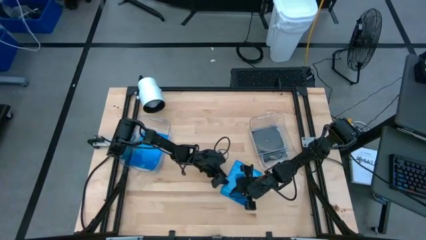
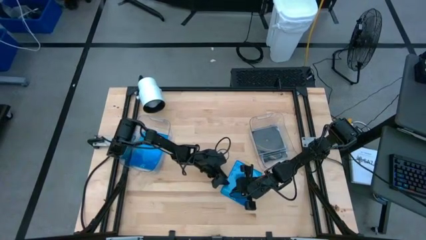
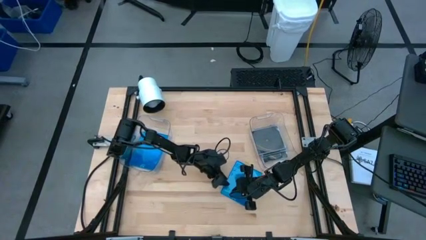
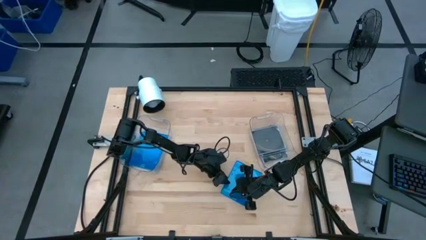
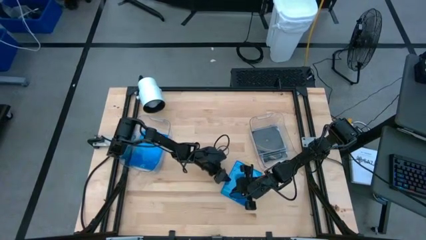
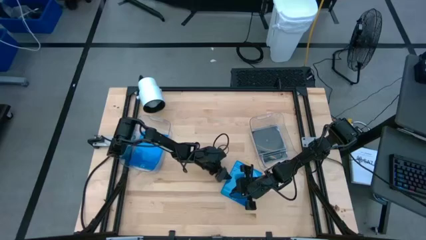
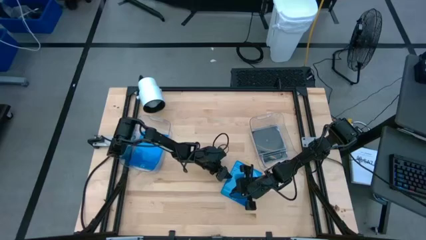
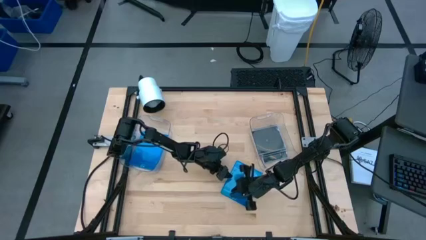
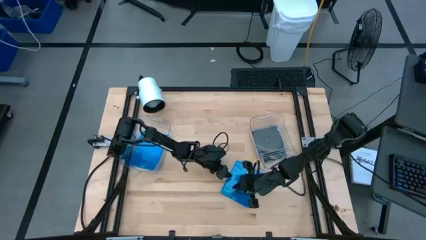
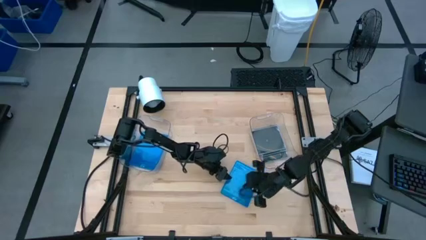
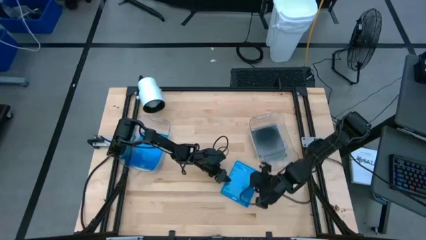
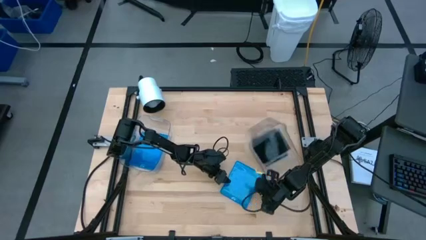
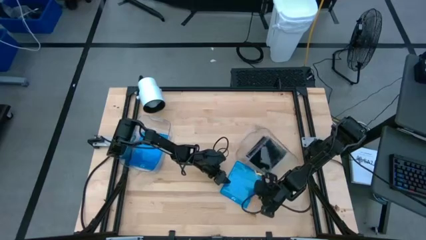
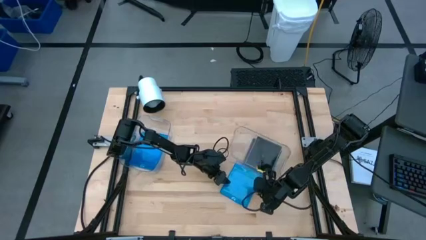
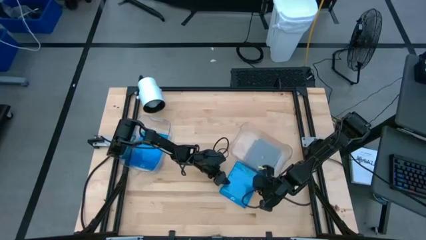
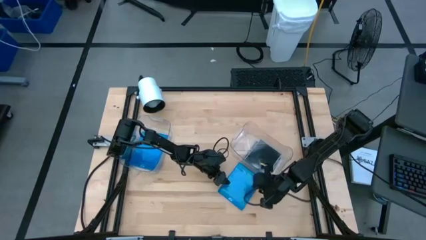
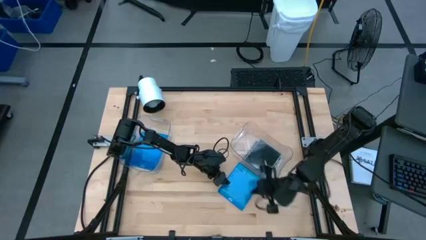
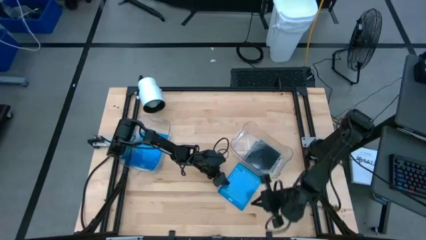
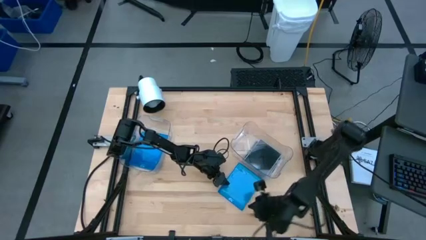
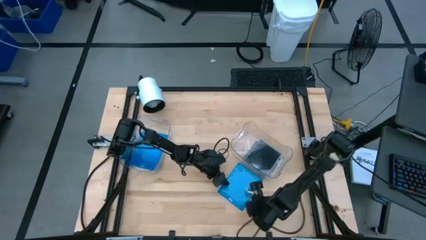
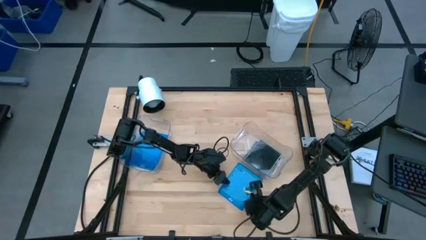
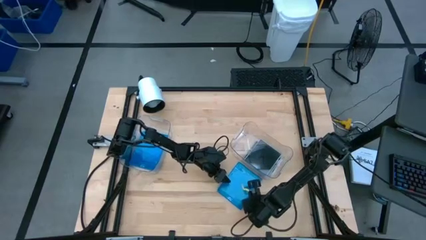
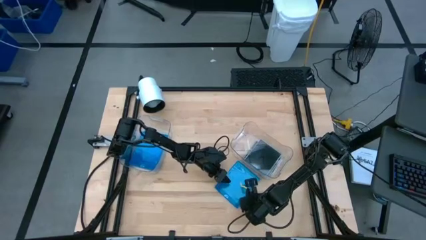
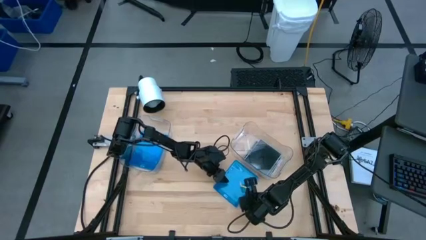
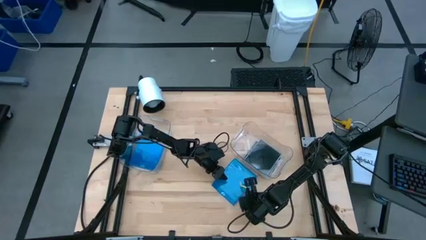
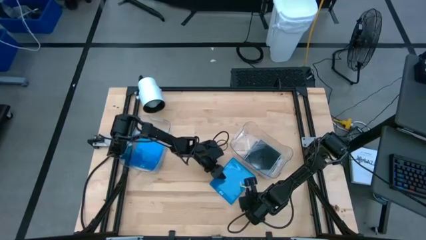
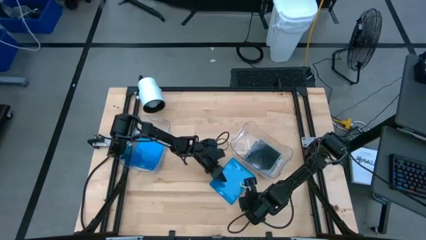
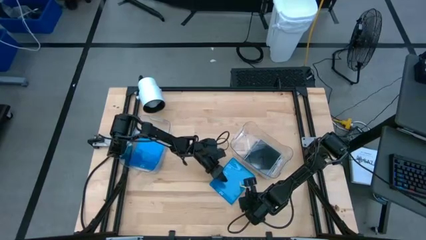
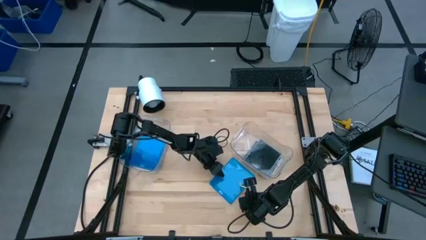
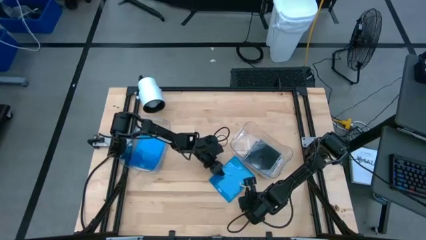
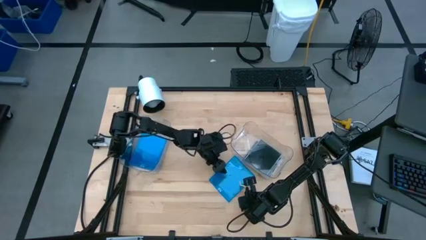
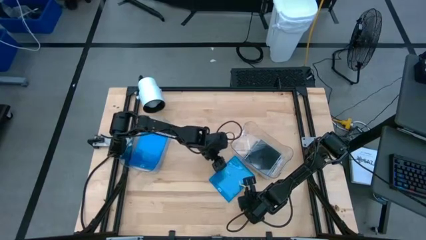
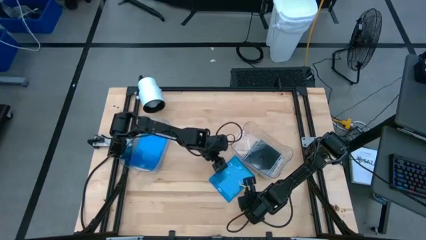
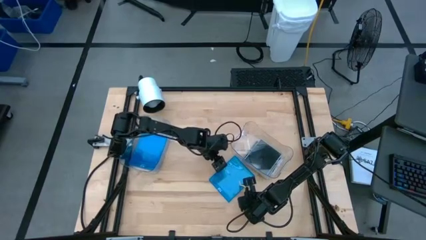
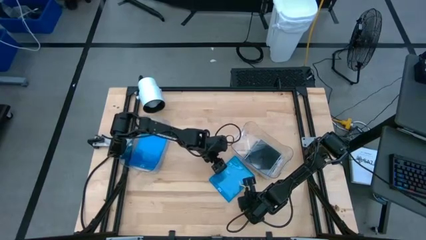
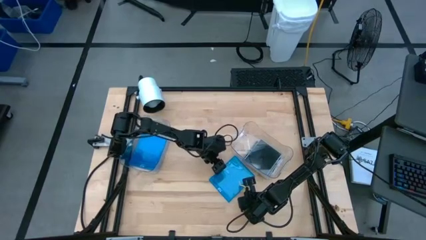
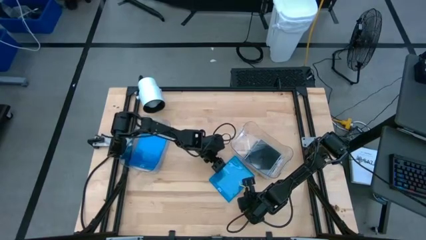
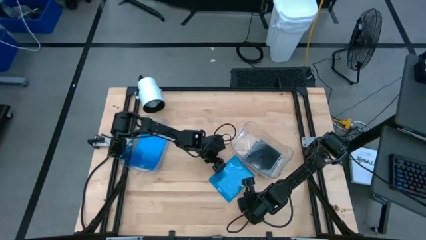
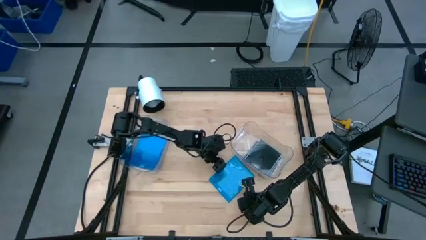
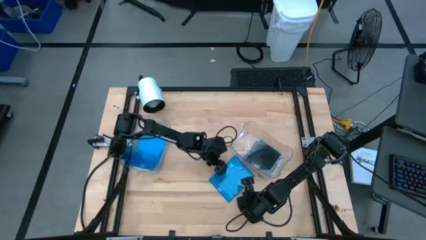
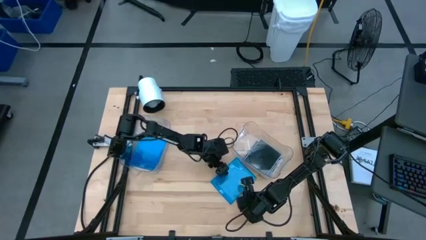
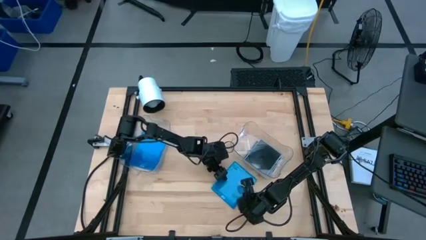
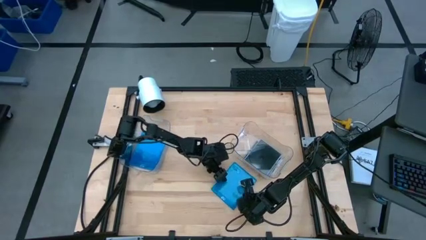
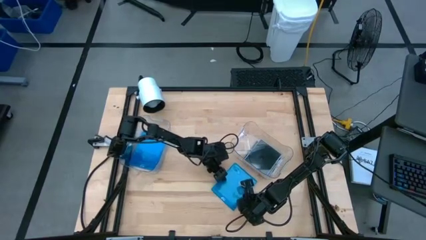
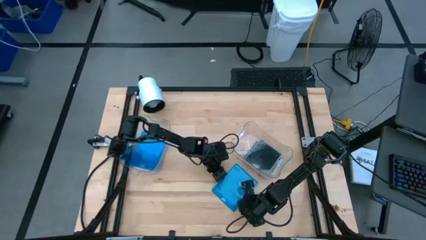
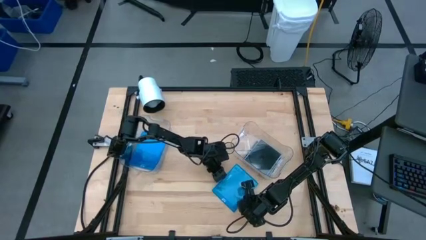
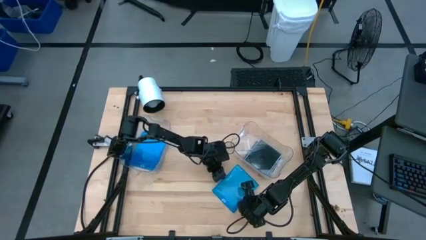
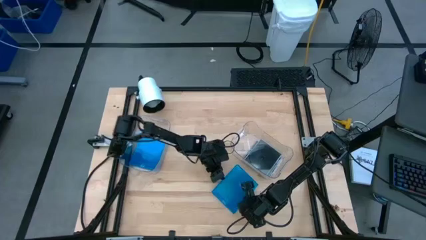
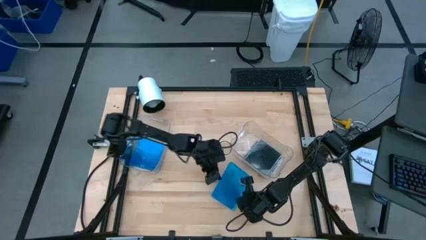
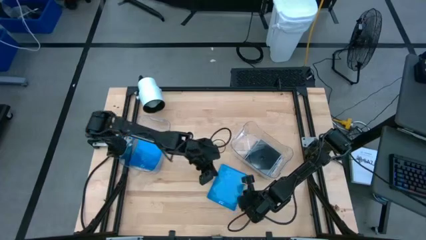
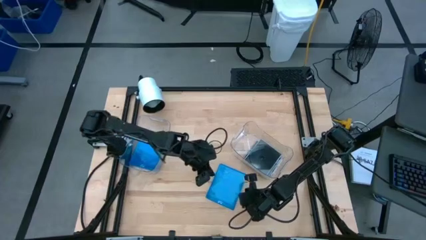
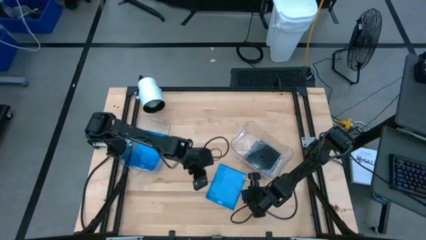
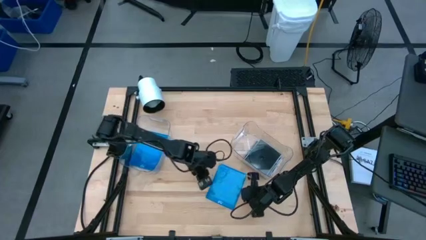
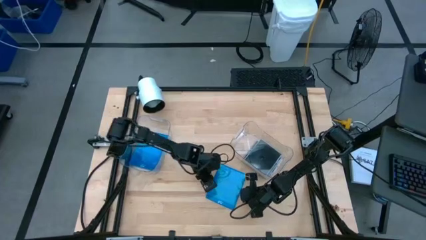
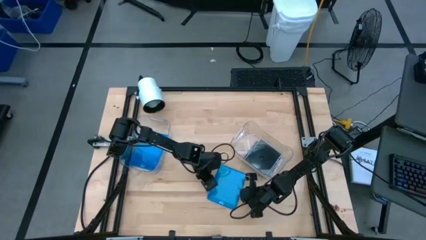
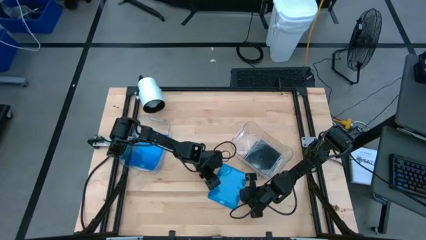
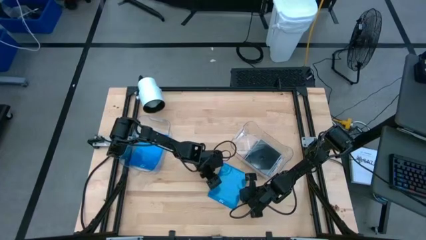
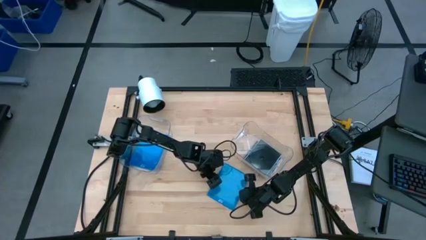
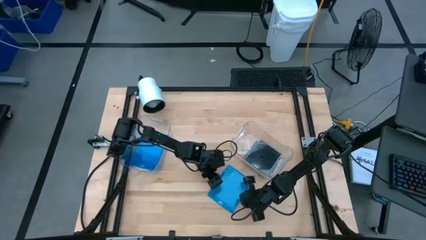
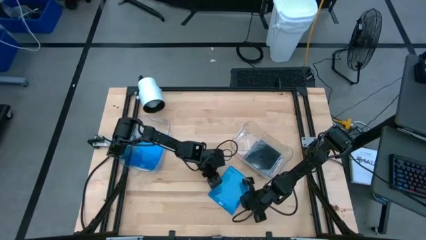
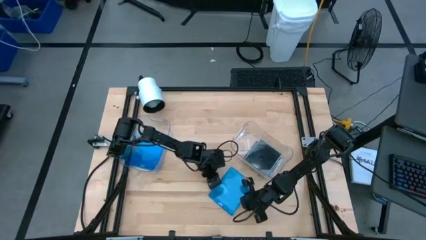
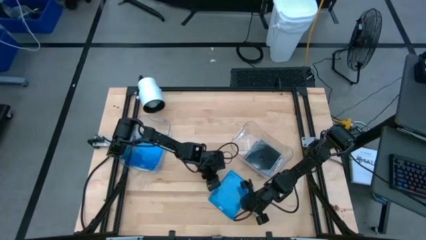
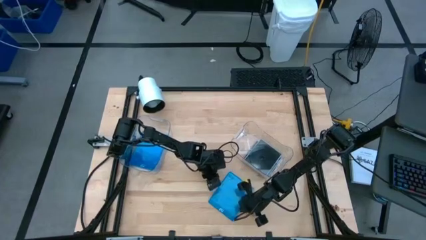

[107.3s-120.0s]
Task: Pick & place jewel cases by type
Put the blue CD case into the left transparent bin
